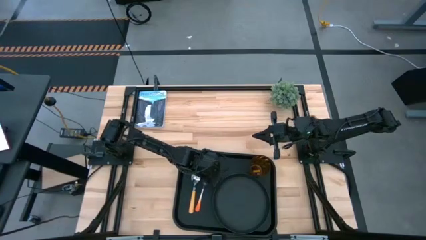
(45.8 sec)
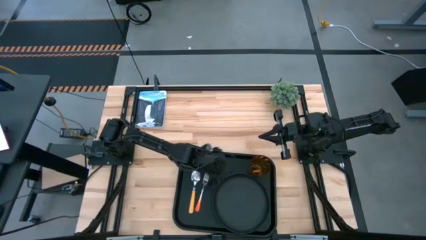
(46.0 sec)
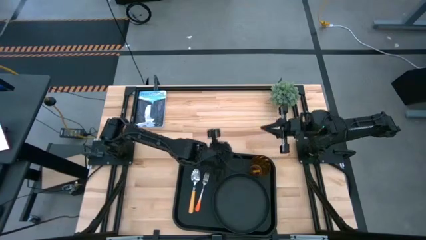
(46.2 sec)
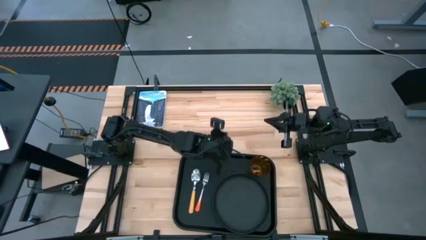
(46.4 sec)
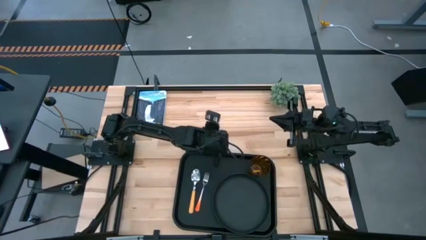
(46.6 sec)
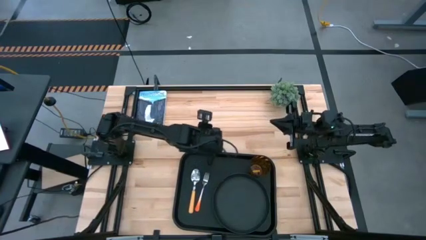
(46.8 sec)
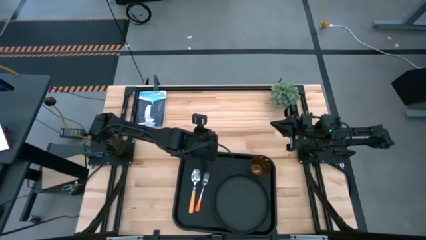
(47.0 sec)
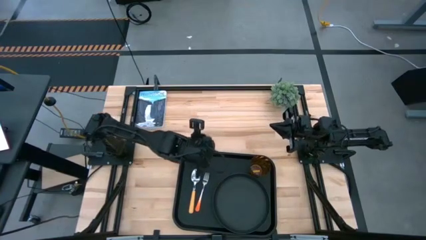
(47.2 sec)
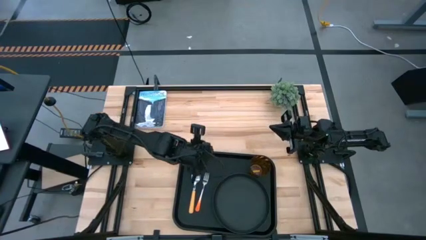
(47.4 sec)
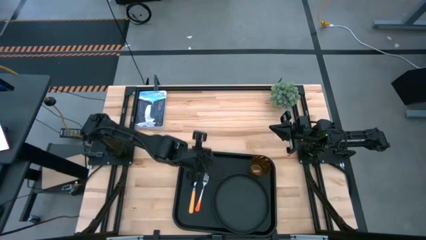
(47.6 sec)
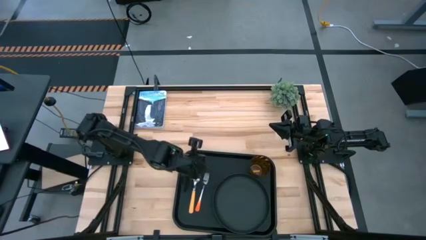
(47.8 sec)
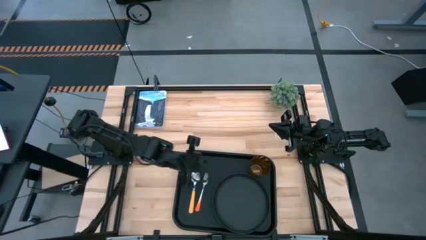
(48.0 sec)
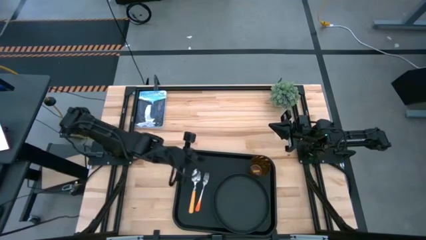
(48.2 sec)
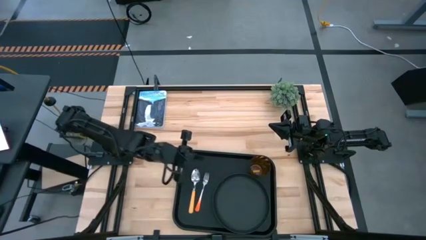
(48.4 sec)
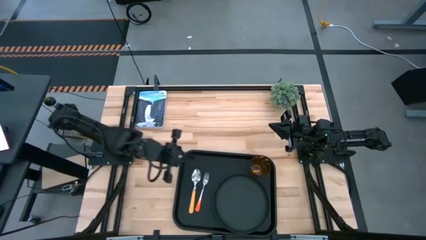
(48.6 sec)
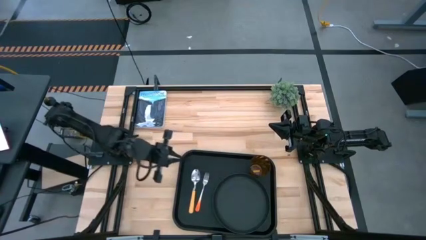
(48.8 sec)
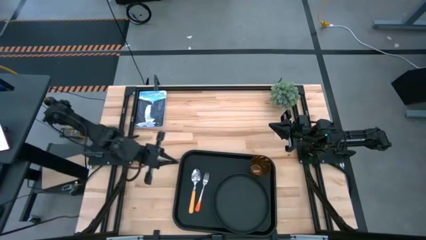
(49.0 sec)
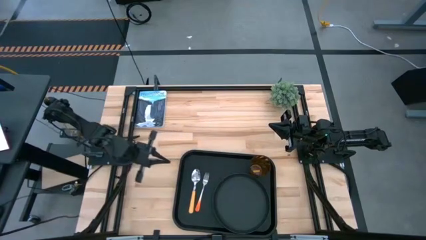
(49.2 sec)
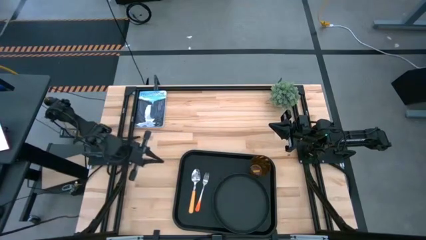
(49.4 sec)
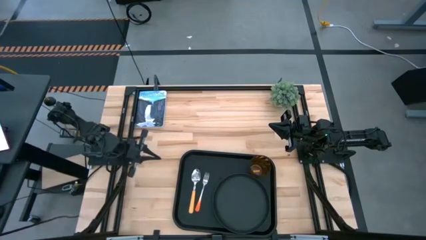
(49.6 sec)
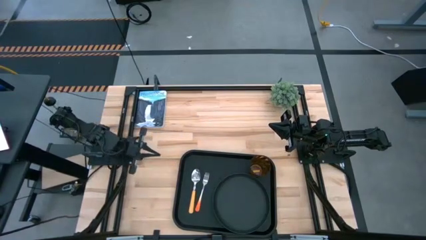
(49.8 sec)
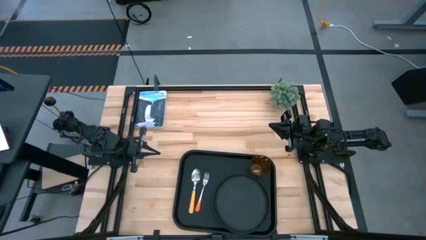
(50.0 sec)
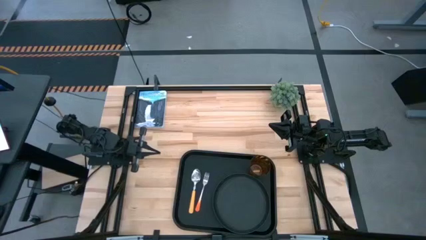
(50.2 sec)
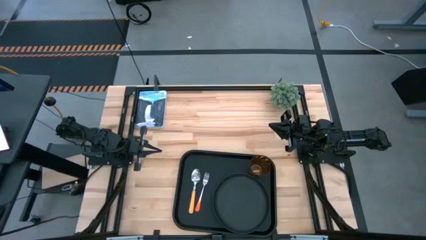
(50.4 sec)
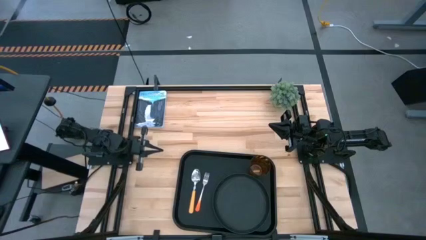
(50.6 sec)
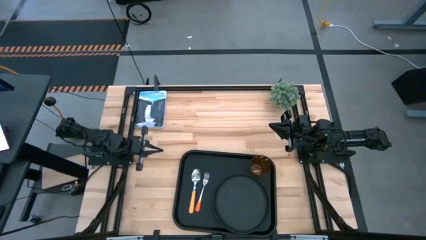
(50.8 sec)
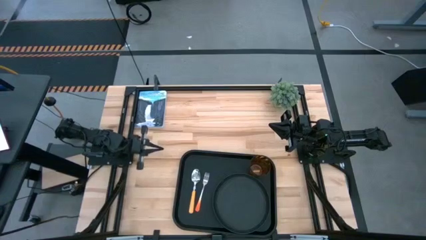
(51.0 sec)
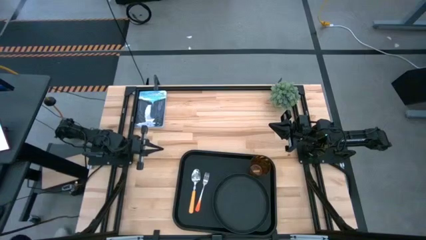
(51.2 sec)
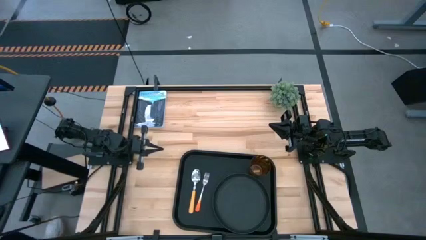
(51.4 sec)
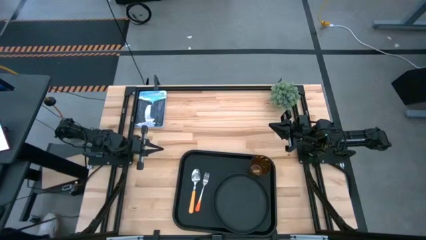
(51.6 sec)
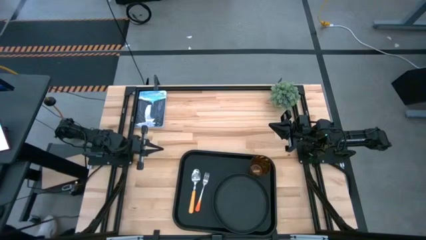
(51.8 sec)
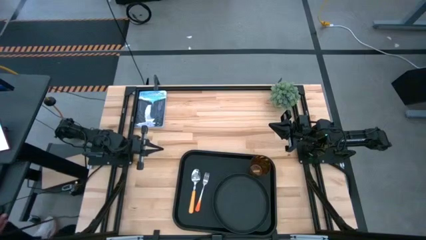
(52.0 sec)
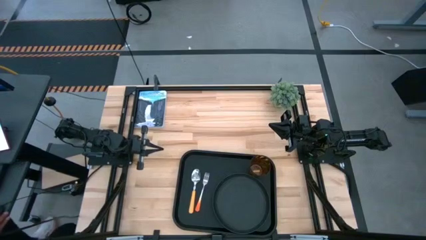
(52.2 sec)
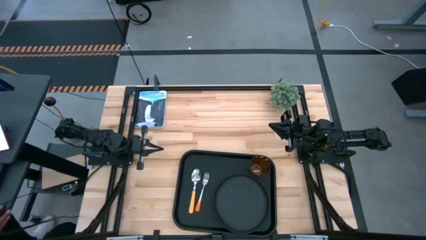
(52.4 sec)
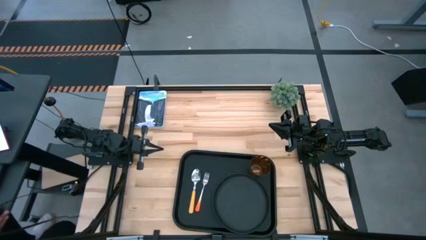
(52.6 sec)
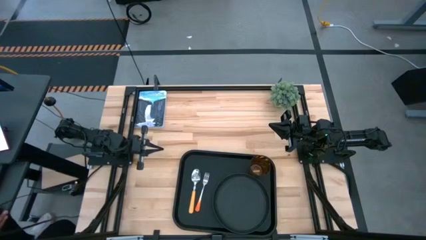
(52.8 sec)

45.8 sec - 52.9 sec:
Task: Pick and place plate/cup/fork/spoon on tray
Return to Home Position

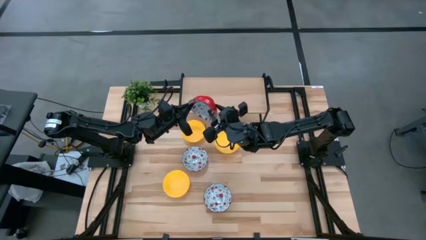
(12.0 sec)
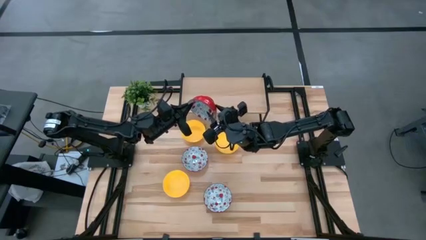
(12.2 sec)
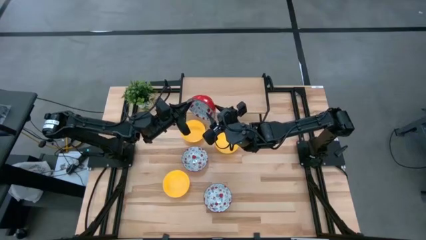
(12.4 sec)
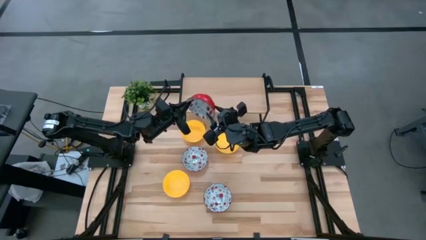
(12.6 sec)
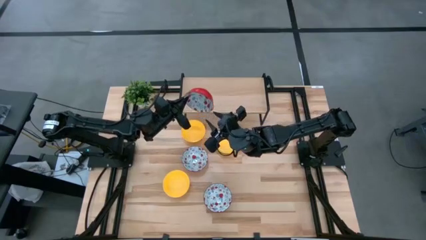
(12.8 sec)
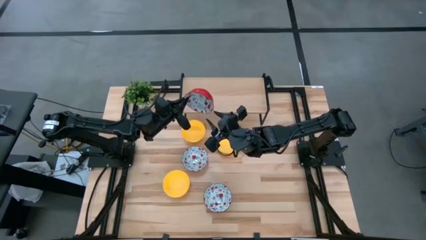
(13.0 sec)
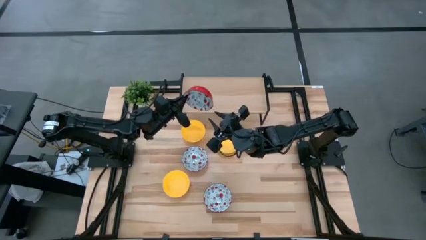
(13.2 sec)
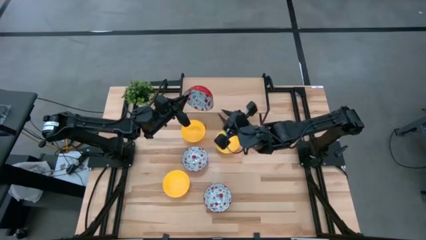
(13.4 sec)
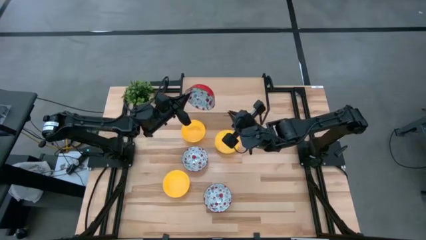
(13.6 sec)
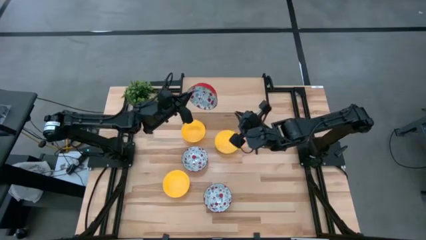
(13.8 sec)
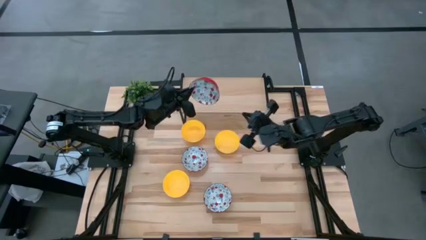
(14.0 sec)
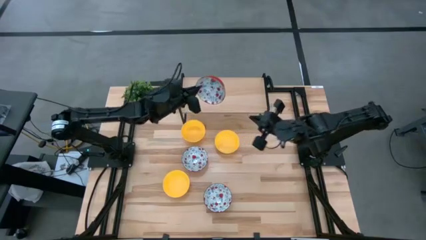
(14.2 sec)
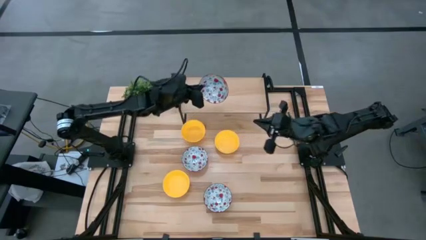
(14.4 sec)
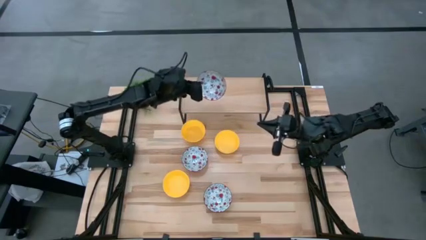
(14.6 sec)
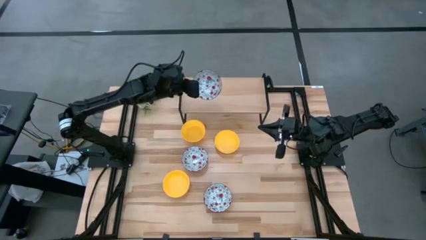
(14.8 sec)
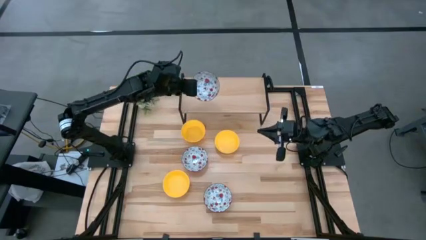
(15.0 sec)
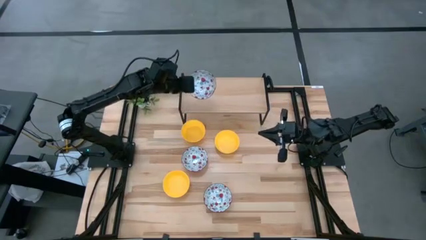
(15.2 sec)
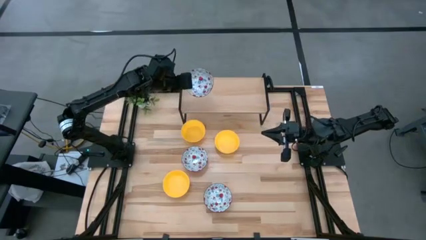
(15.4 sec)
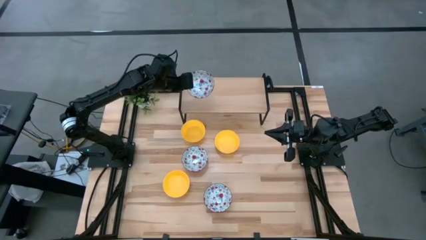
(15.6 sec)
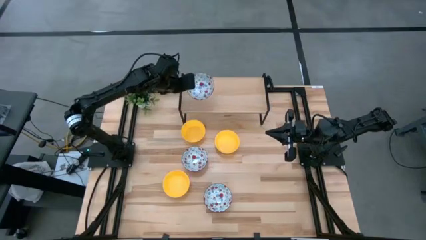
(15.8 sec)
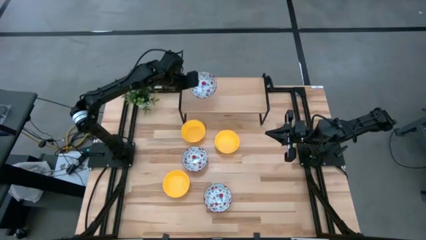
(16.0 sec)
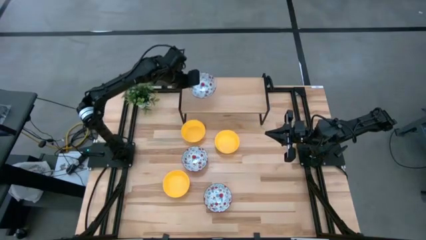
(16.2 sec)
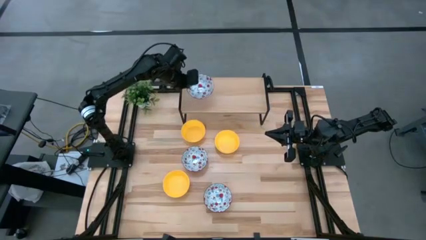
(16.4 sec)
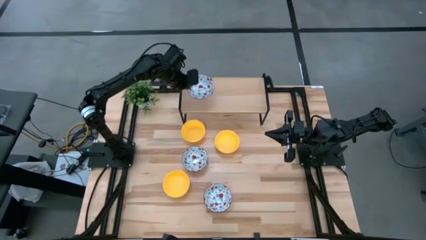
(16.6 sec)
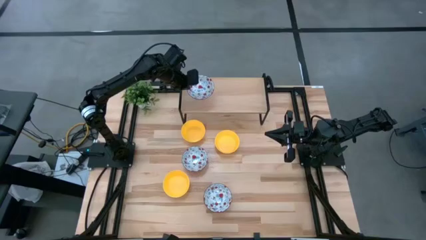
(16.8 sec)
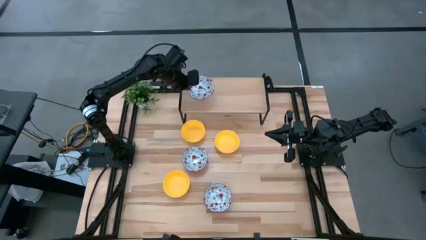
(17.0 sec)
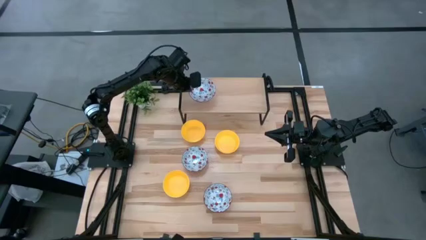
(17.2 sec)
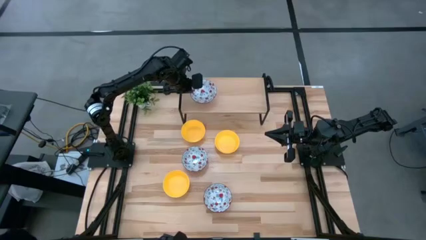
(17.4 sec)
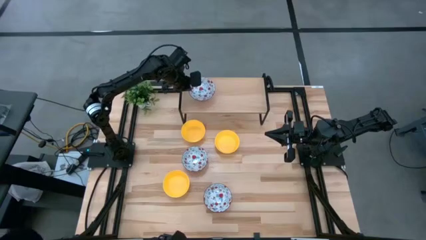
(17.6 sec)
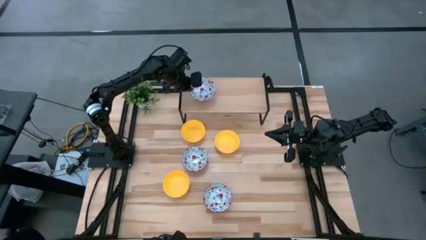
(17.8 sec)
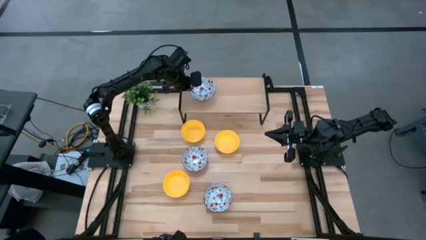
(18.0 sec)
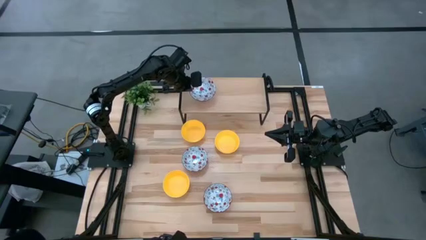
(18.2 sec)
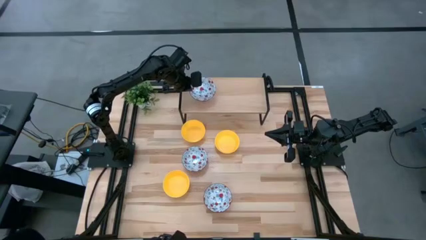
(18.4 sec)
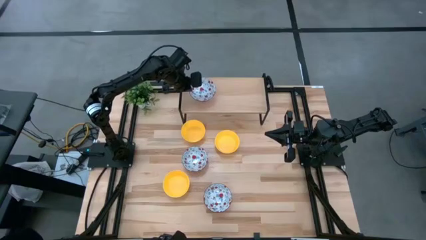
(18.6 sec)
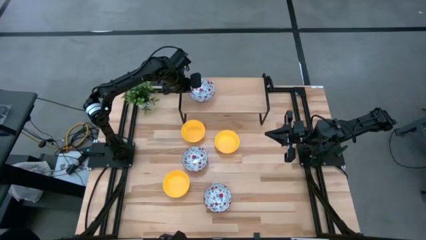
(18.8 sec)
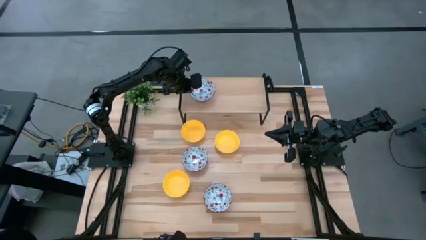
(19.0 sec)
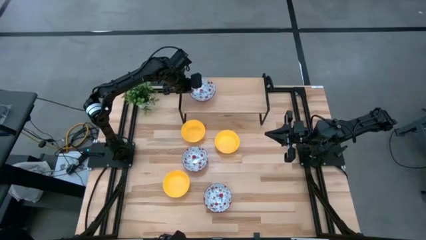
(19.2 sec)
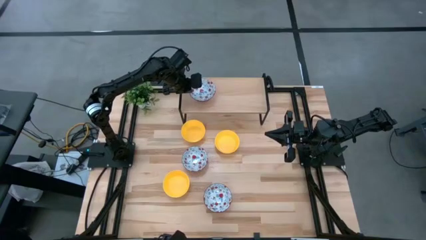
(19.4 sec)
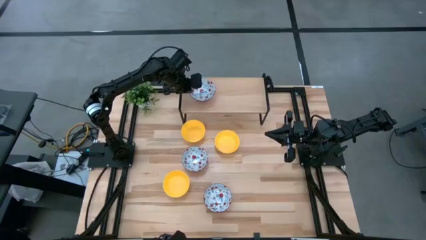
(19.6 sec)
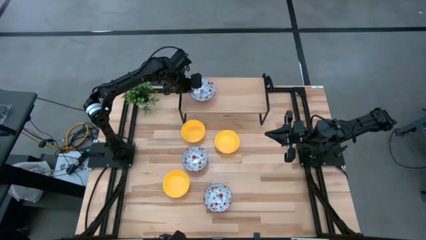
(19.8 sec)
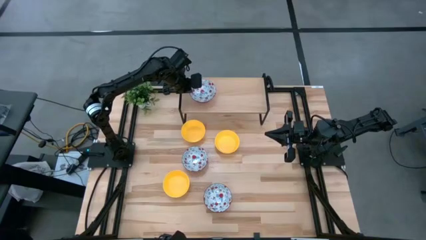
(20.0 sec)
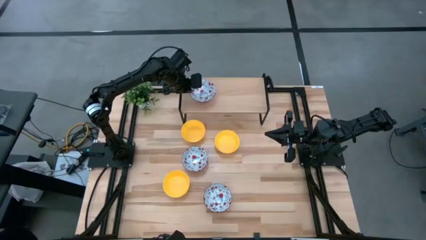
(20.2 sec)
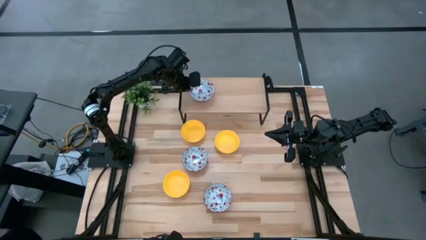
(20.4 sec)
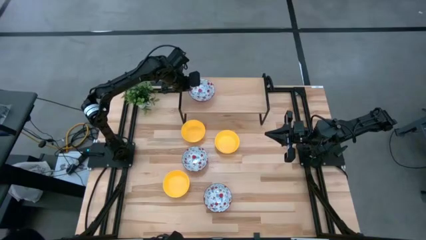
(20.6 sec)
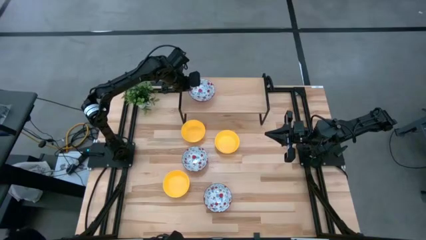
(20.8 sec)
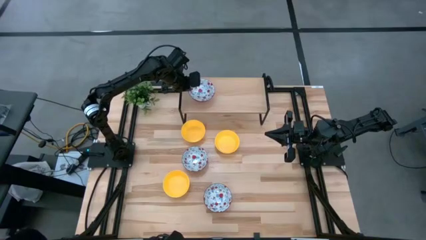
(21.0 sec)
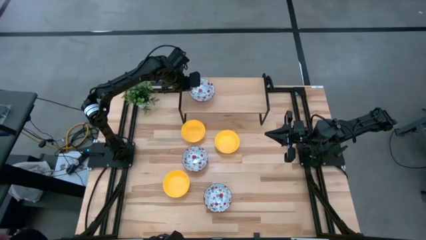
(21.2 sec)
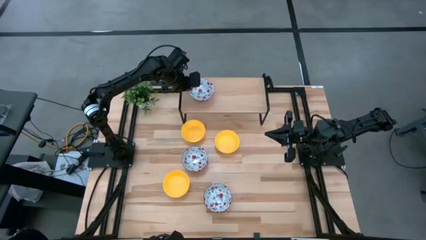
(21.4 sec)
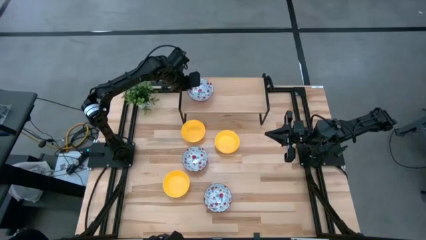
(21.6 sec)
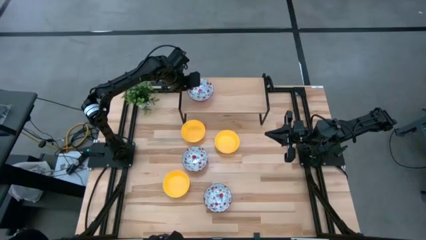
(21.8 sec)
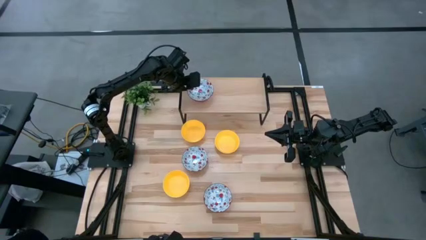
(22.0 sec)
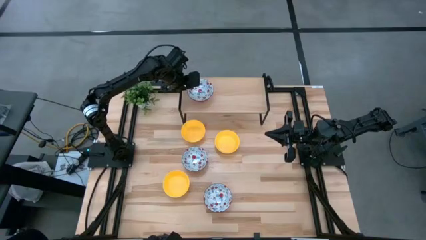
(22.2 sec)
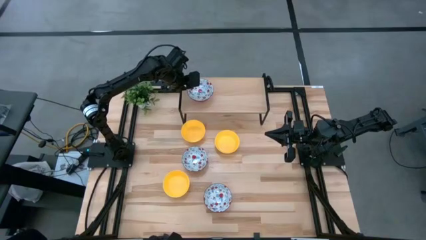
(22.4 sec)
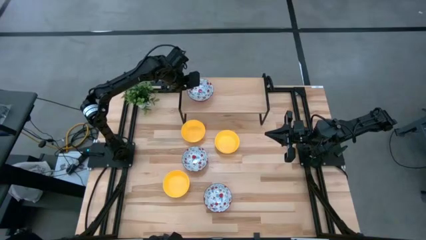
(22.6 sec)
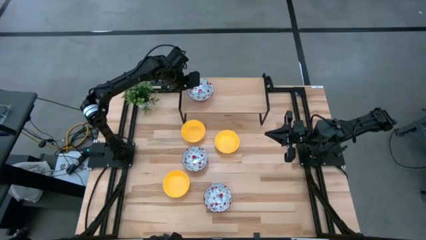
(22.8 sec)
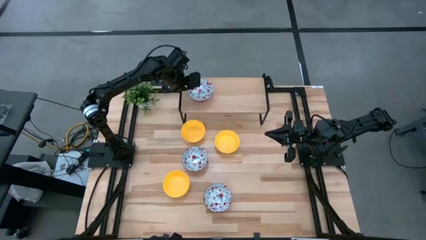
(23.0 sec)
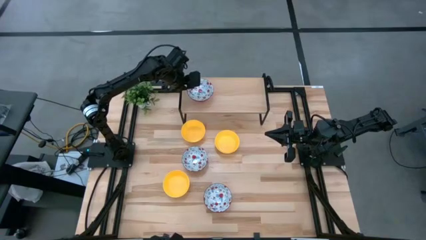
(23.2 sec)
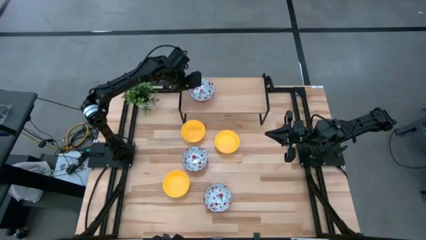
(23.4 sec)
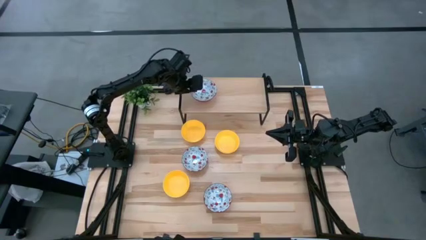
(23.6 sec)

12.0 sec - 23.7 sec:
Task: Pick & Place Mini bowls
Put the top right white patterned bowl on the shelf
